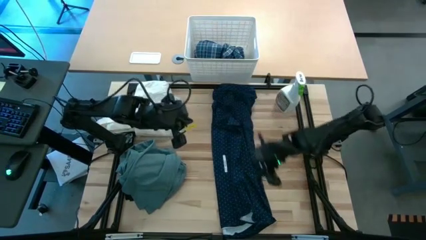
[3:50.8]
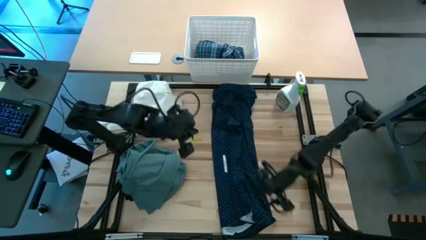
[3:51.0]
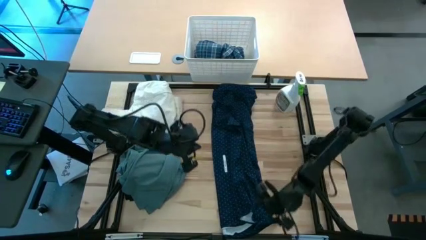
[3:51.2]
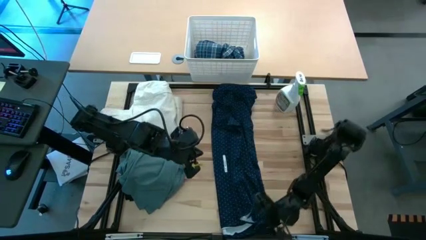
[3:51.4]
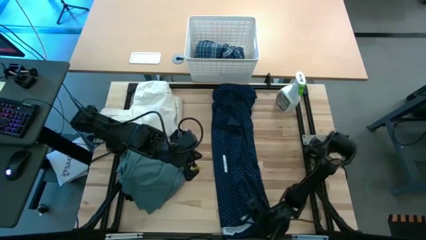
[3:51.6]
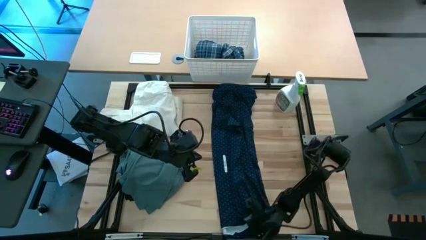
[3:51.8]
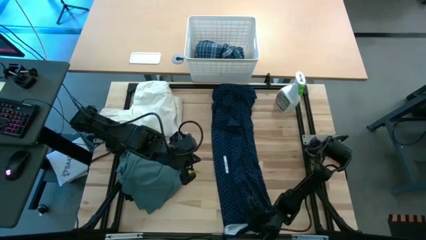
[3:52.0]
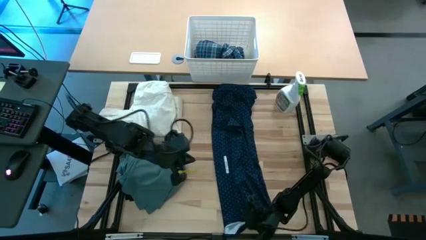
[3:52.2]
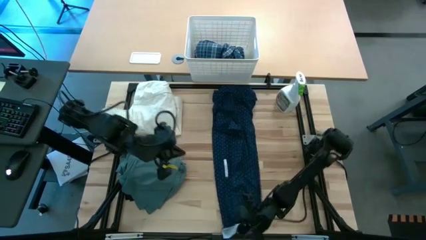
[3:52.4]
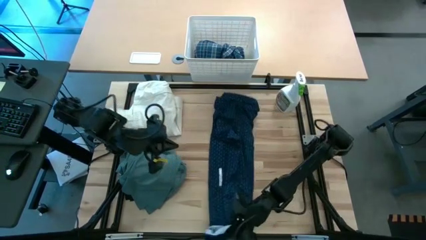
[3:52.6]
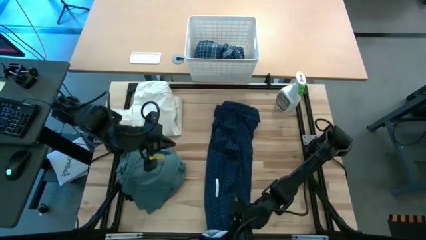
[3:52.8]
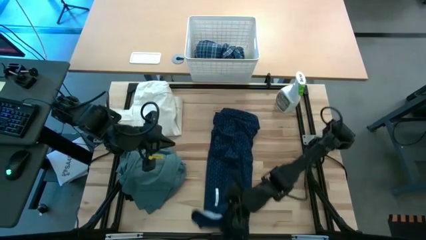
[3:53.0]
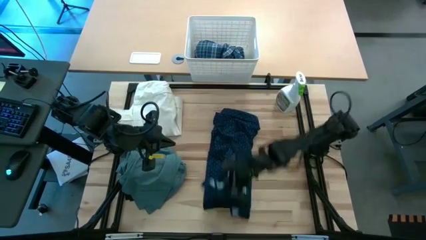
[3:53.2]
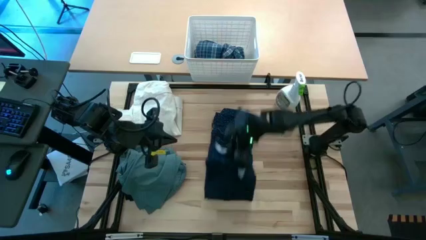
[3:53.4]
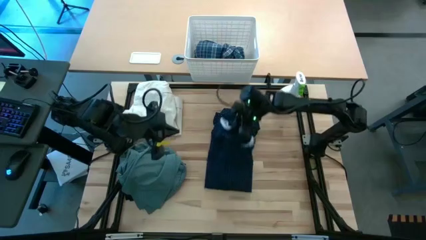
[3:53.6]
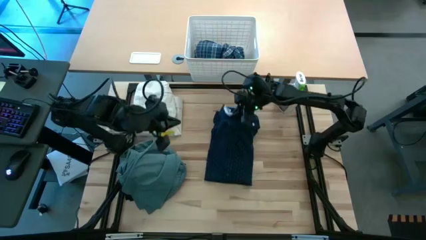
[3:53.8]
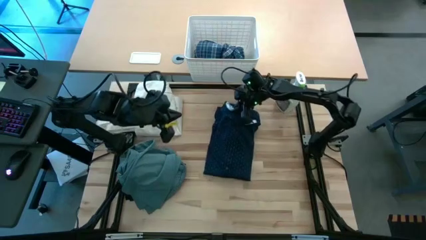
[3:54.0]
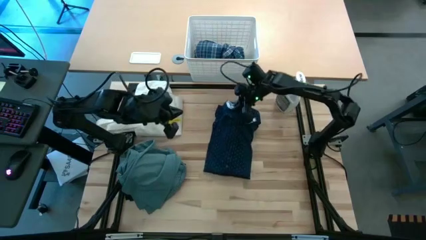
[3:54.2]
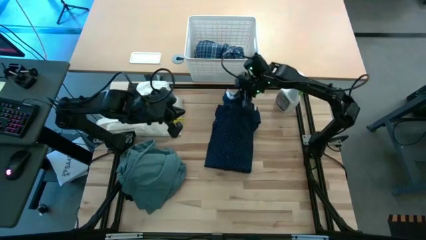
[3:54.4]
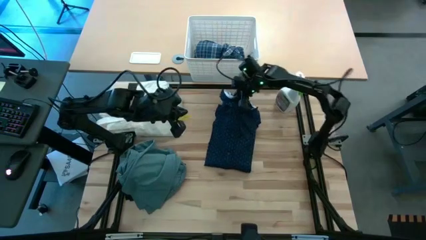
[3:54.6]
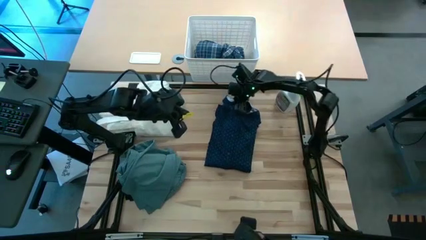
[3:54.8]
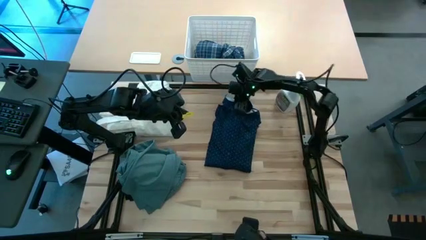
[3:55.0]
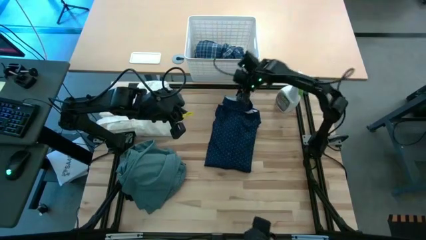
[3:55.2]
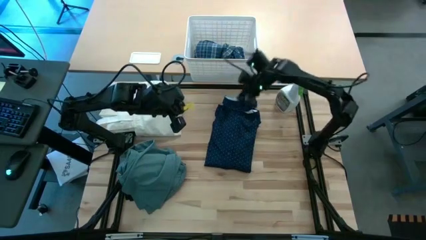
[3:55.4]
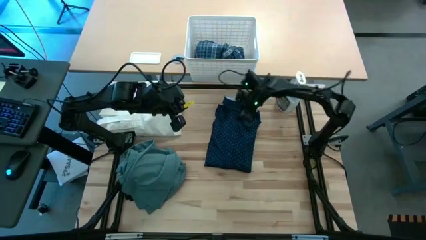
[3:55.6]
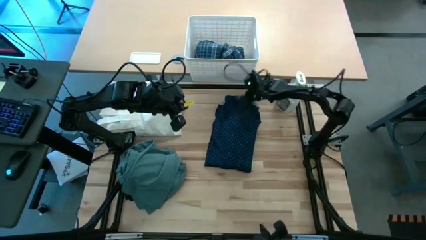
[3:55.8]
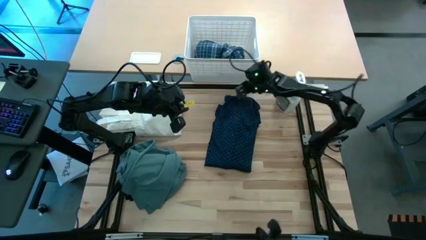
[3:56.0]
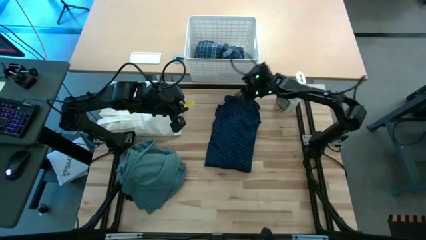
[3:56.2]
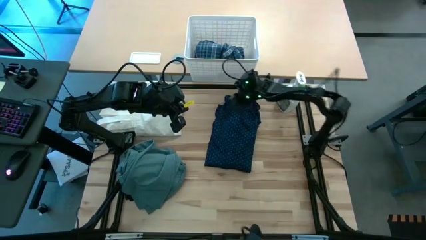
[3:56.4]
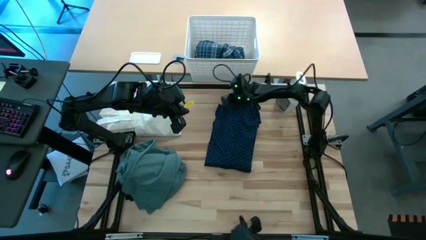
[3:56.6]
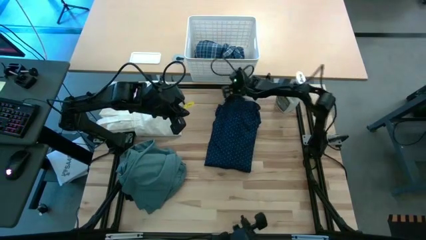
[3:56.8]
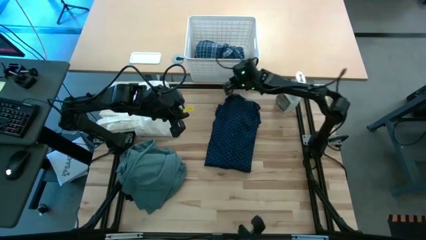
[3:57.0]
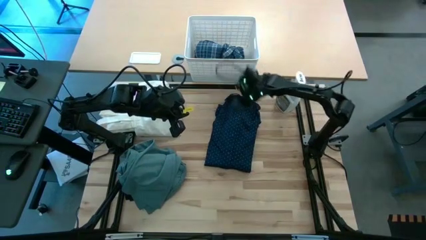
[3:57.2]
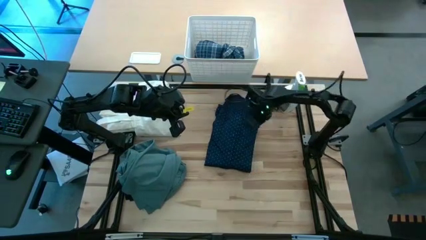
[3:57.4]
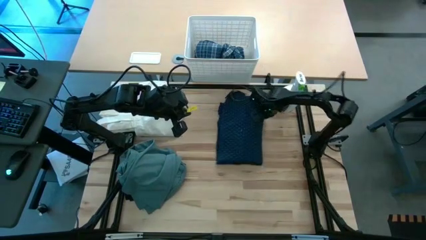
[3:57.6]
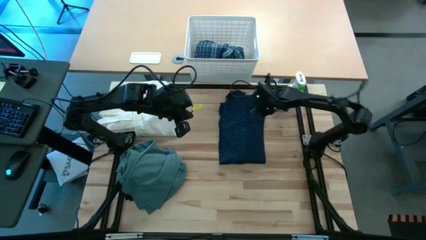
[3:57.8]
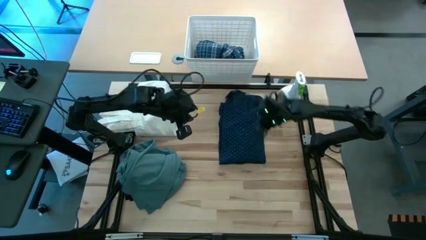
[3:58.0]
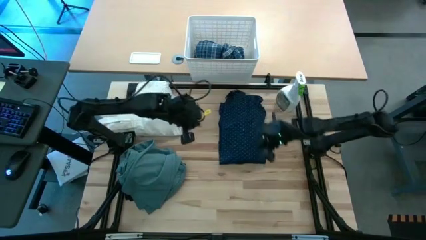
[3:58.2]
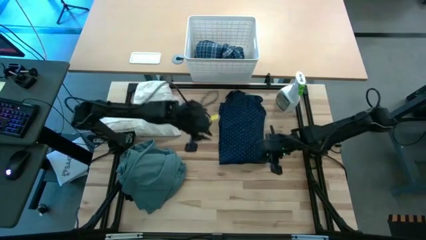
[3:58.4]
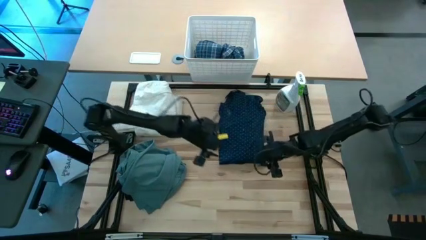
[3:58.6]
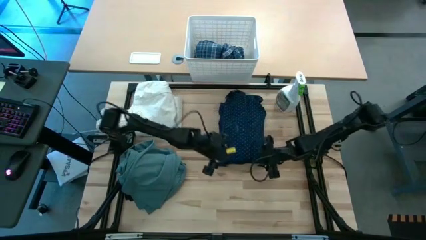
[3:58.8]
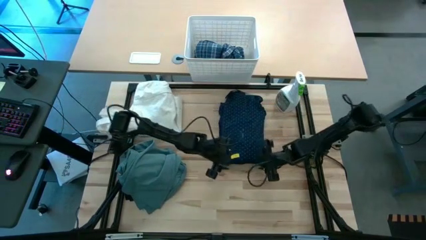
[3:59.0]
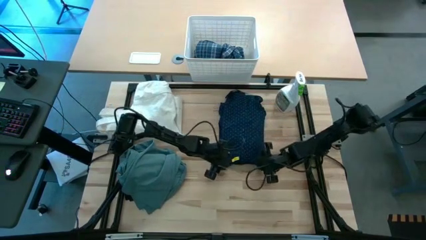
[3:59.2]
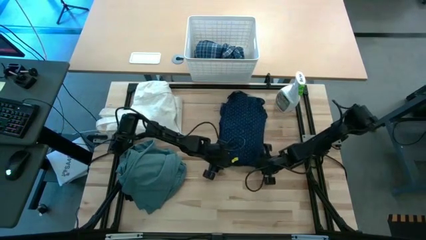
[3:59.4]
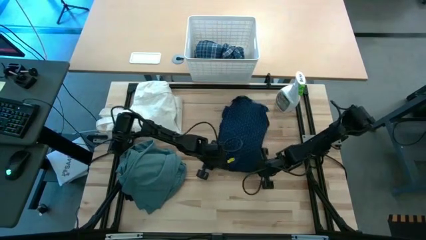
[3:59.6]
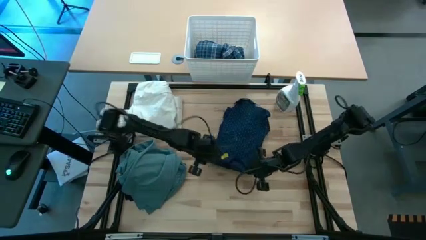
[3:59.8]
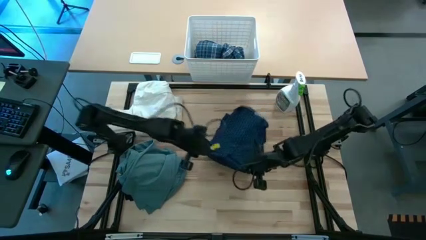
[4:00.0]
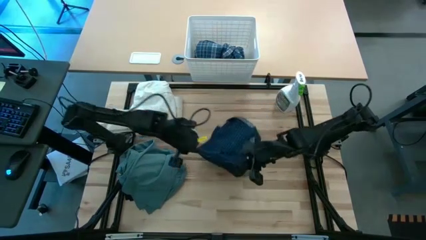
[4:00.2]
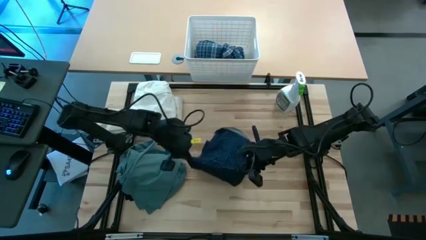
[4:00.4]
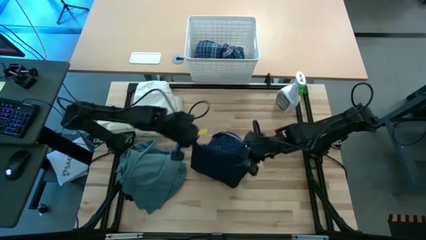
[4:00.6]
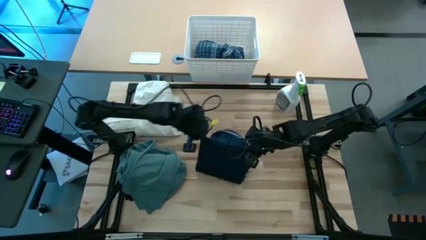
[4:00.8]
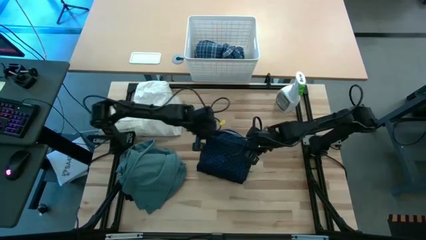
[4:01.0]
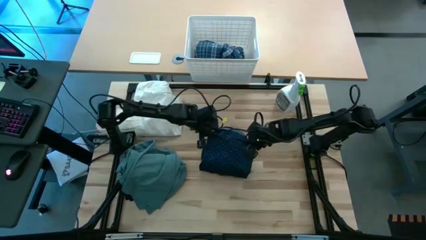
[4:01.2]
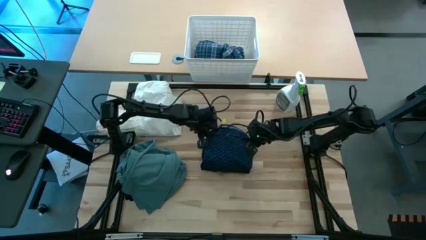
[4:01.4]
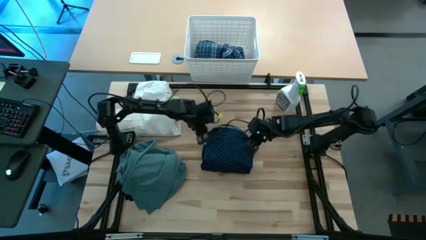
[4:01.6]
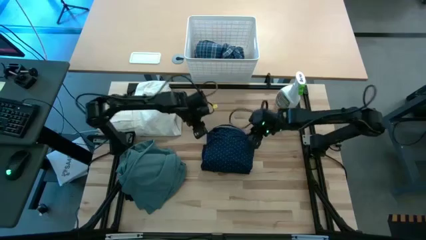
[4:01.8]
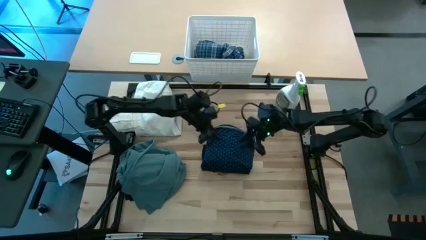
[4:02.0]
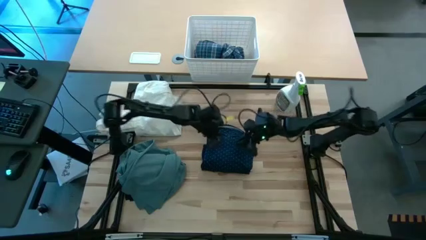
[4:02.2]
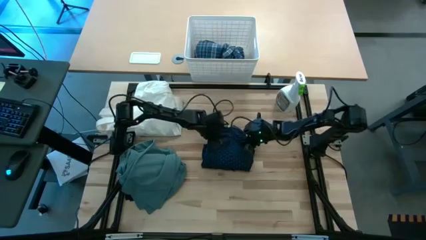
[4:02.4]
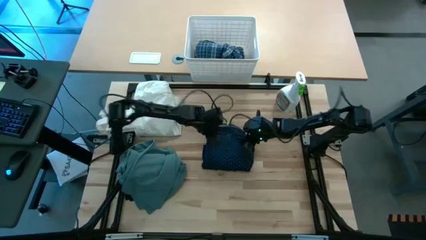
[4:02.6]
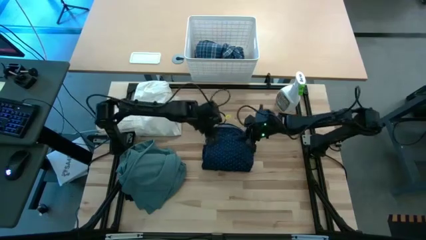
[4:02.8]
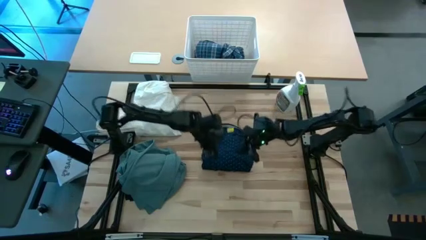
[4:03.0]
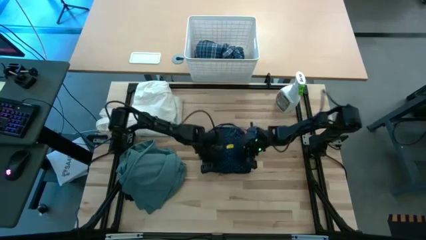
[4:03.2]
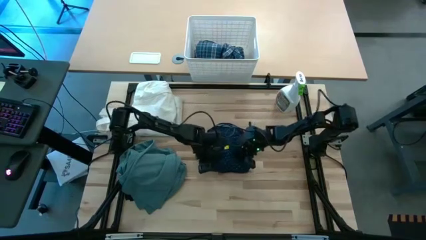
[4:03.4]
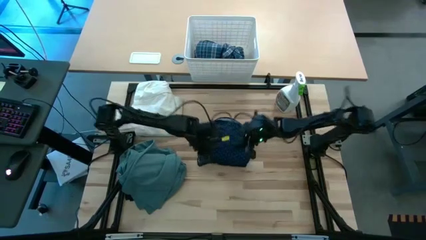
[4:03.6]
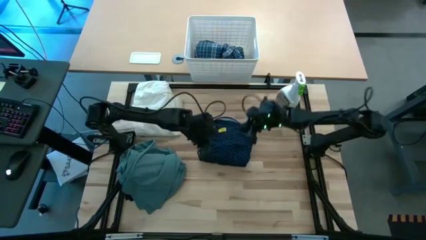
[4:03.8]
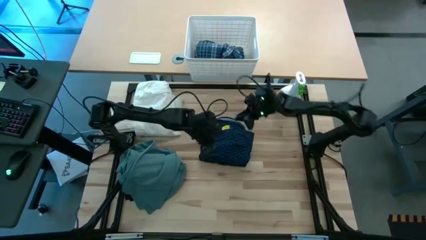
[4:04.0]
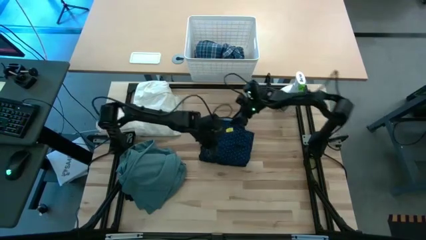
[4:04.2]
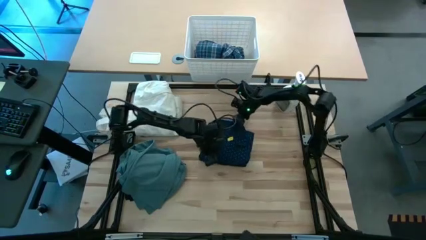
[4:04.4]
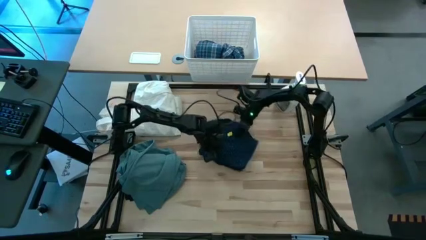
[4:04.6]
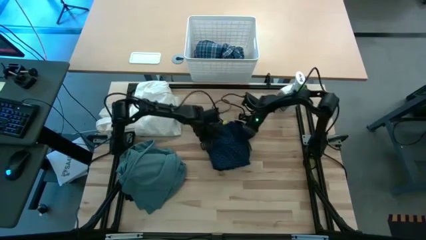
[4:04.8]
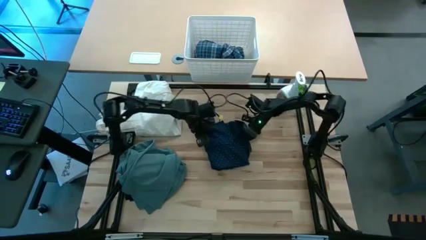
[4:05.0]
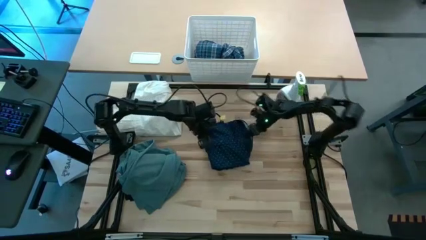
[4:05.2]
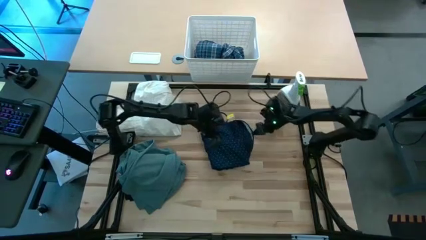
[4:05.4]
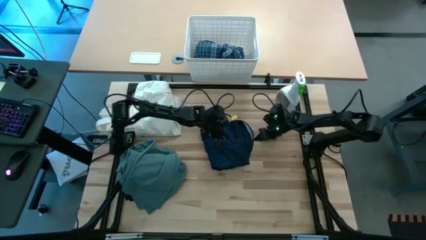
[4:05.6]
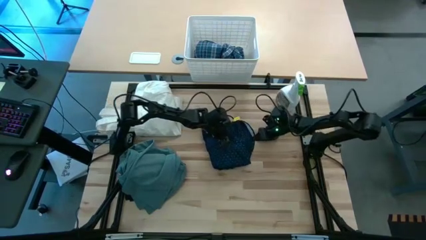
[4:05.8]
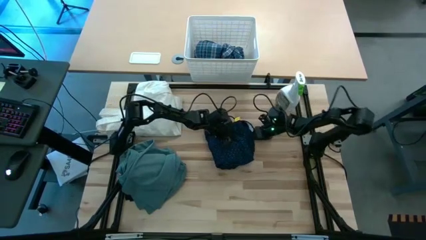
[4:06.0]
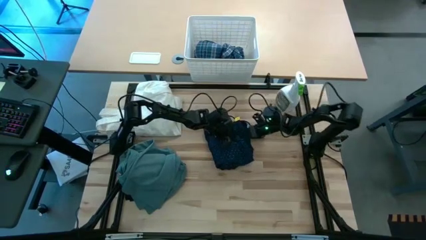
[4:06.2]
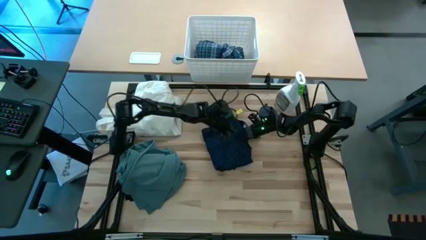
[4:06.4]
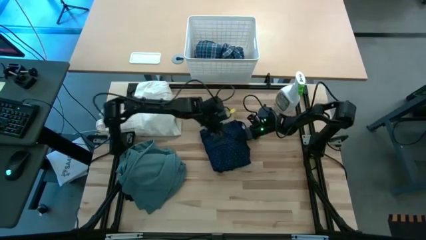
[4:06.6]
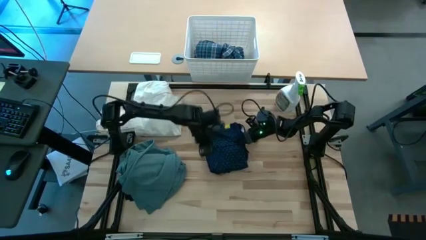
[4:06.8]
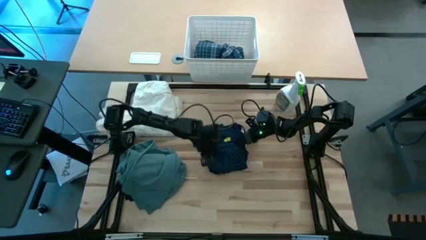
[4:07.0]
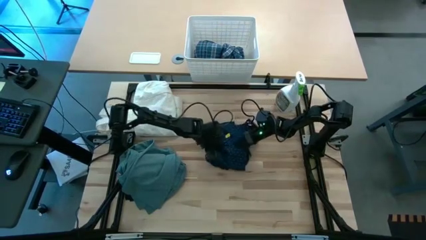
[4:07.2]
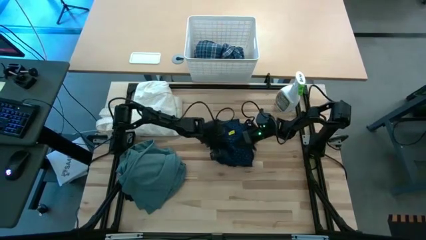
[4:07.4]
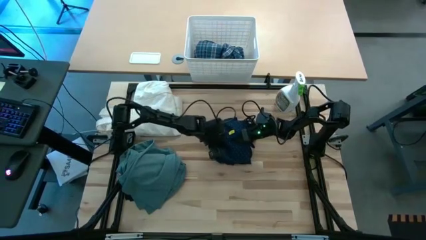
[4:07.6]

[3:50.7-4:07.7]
Fold the dark blue polo
